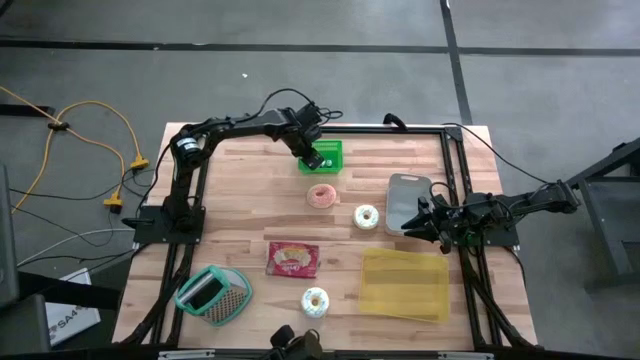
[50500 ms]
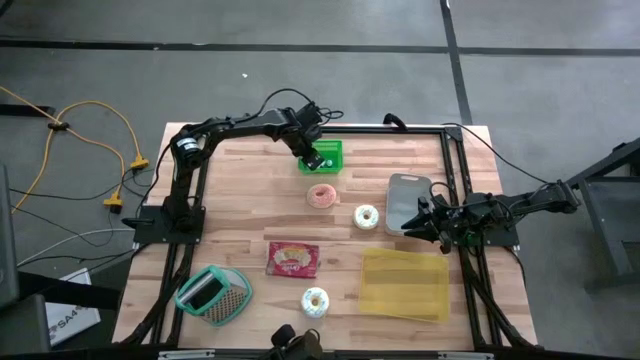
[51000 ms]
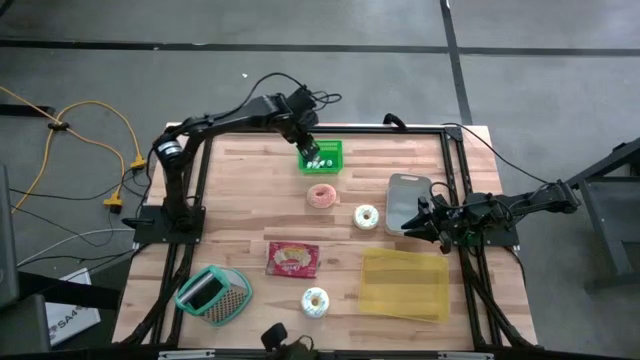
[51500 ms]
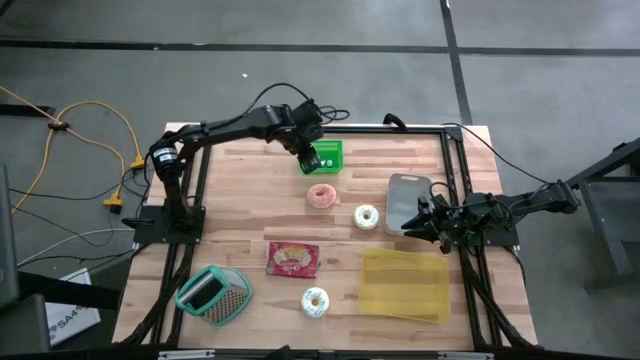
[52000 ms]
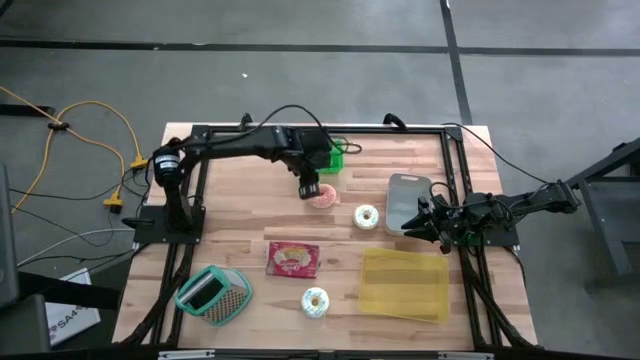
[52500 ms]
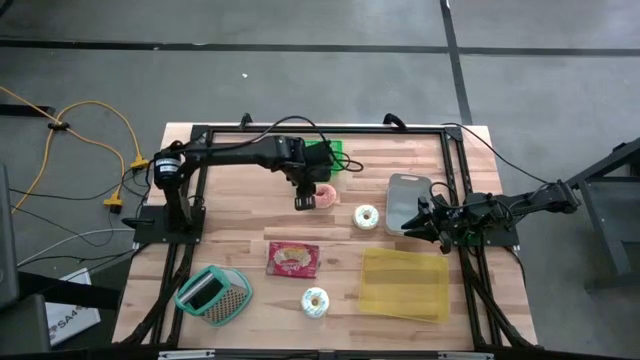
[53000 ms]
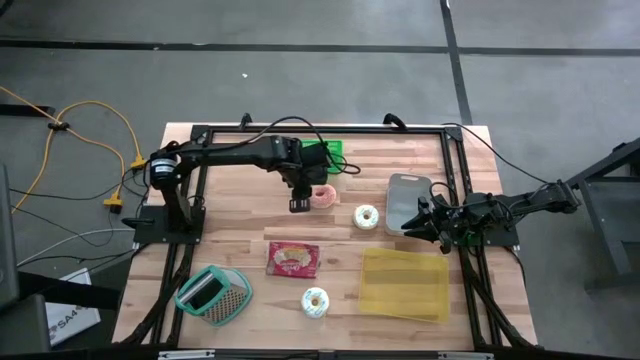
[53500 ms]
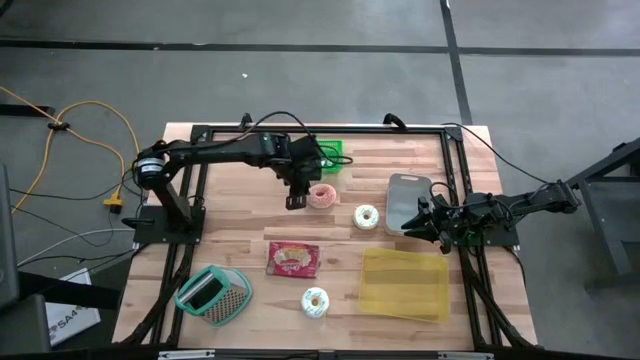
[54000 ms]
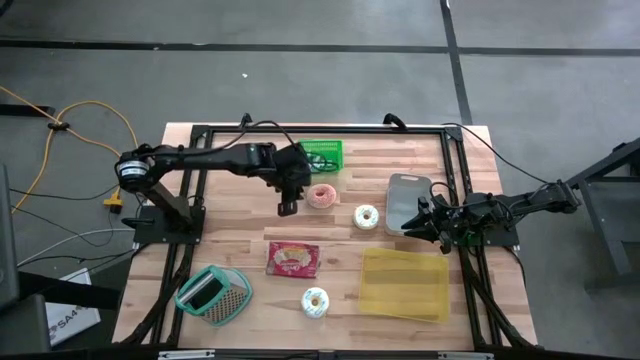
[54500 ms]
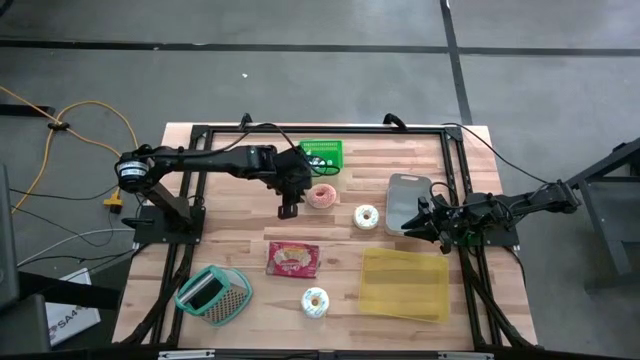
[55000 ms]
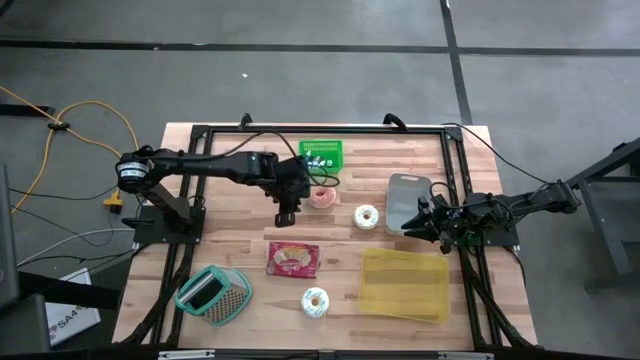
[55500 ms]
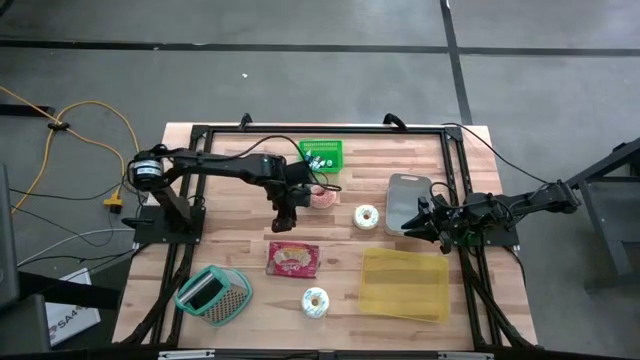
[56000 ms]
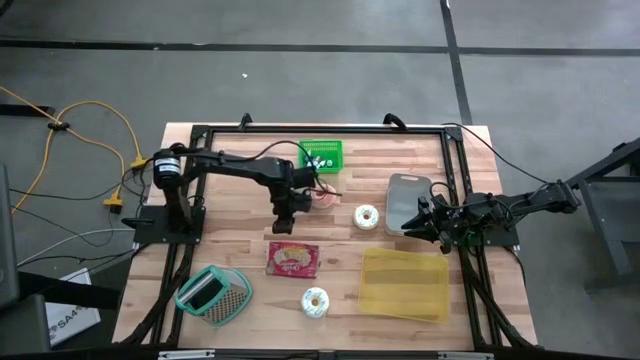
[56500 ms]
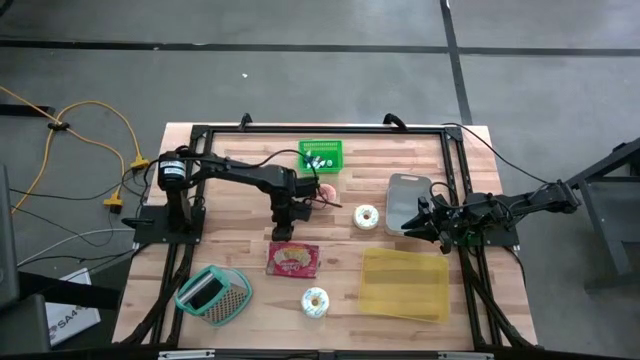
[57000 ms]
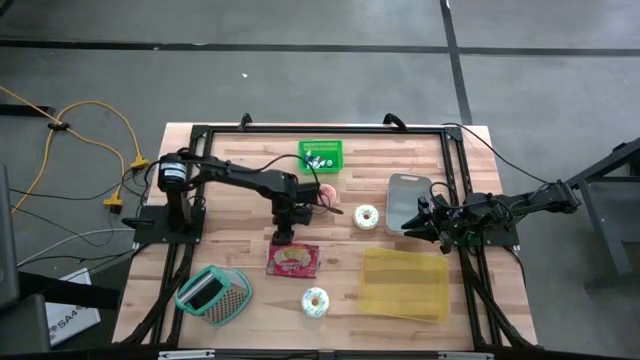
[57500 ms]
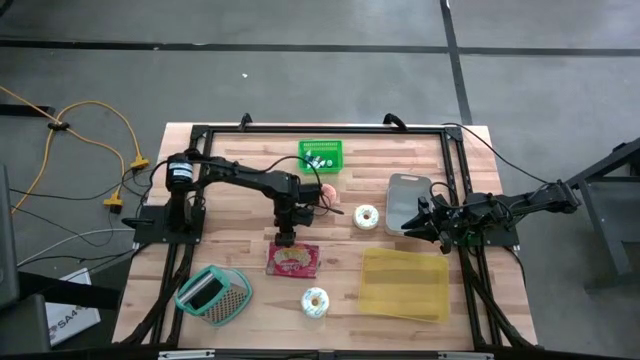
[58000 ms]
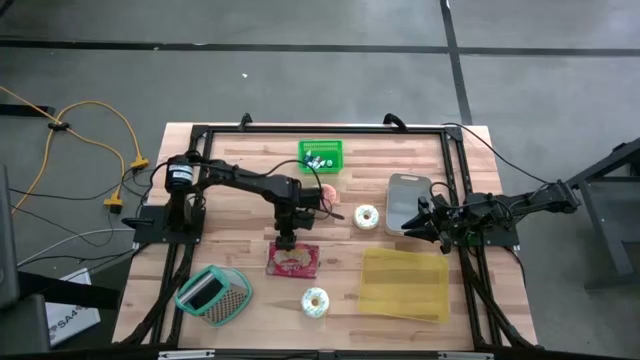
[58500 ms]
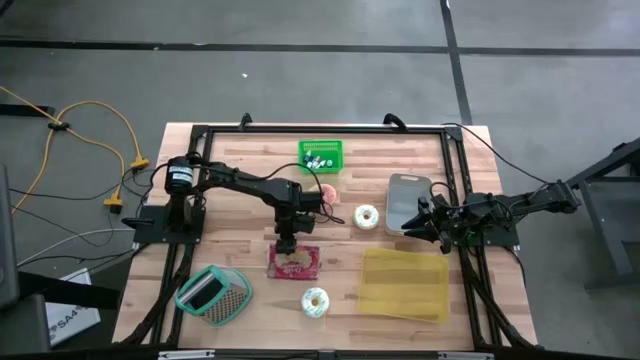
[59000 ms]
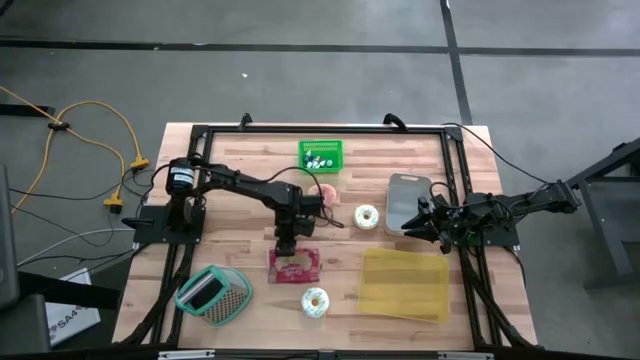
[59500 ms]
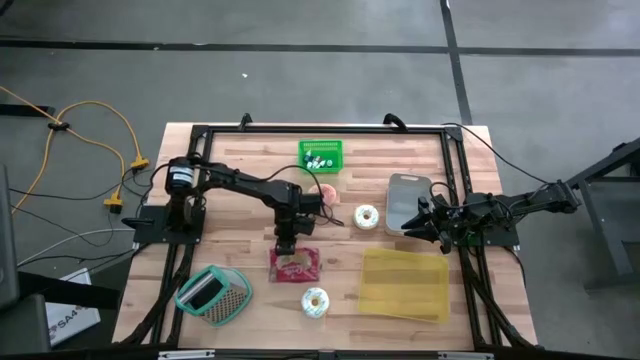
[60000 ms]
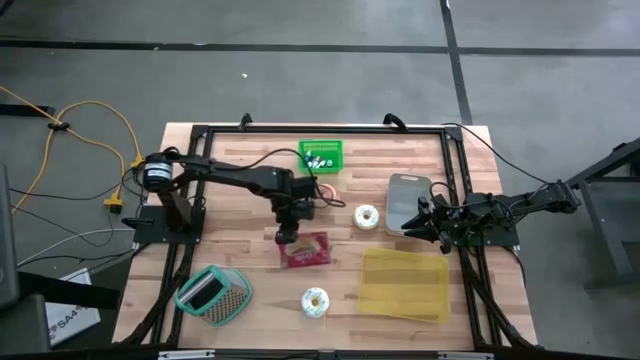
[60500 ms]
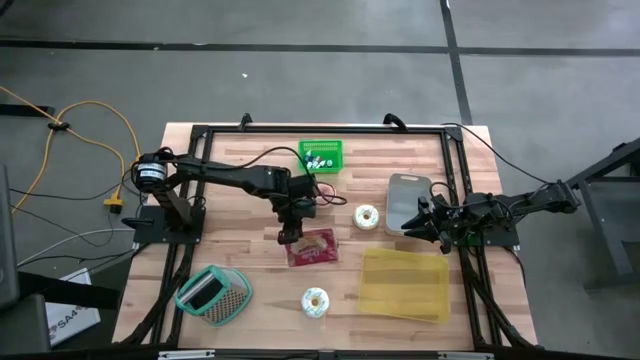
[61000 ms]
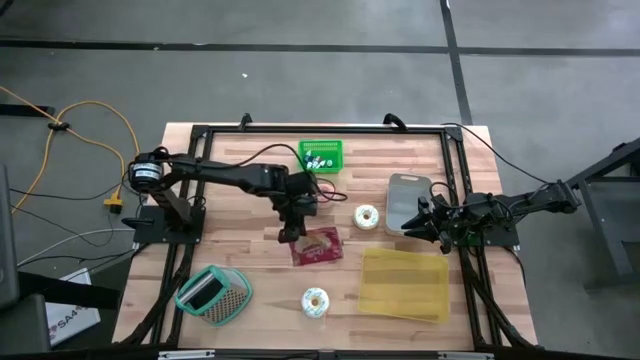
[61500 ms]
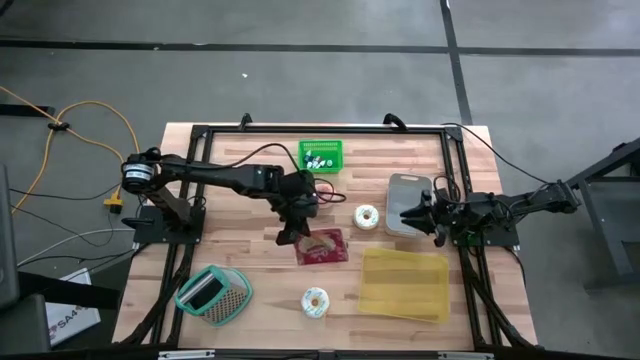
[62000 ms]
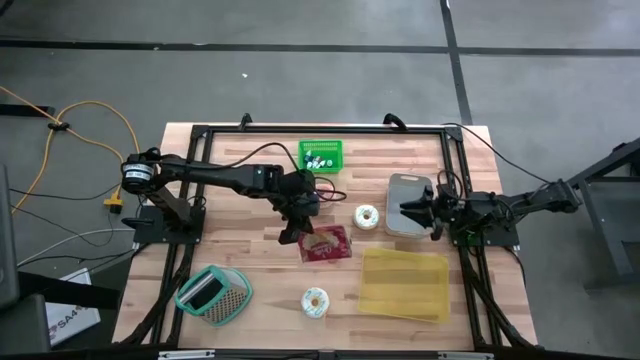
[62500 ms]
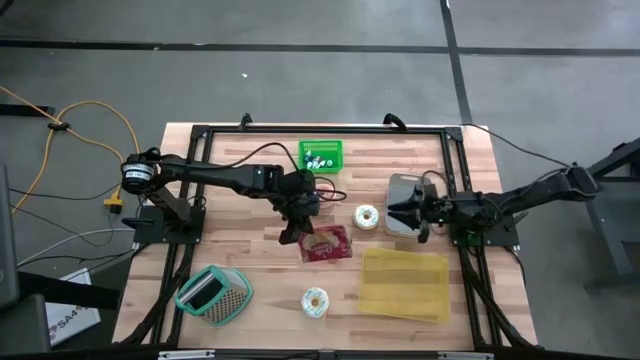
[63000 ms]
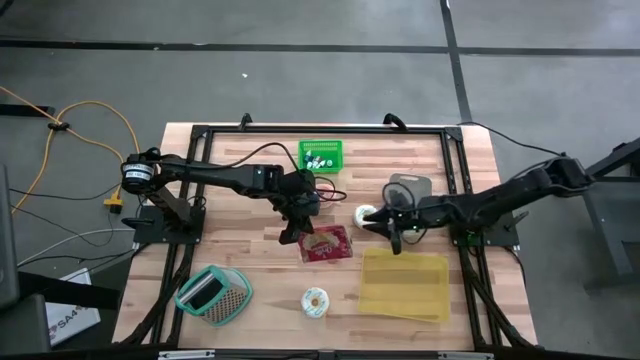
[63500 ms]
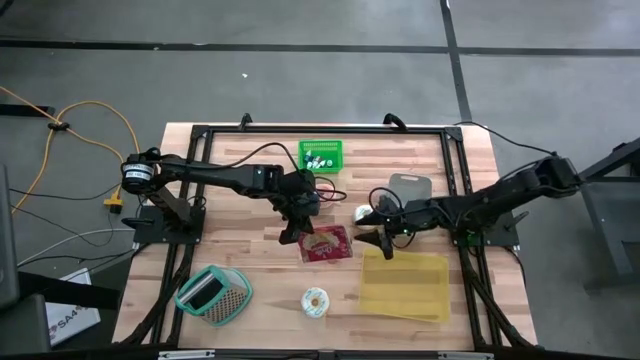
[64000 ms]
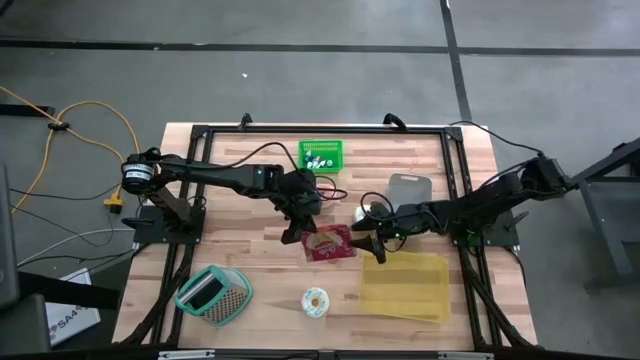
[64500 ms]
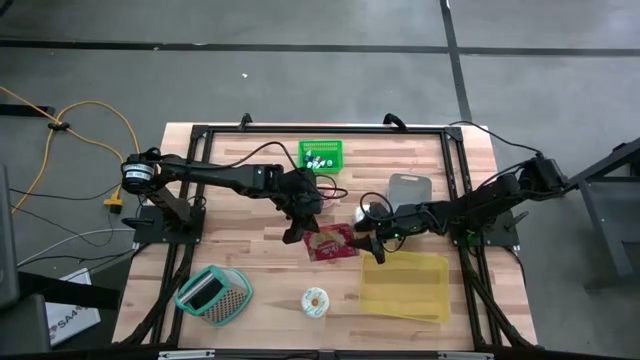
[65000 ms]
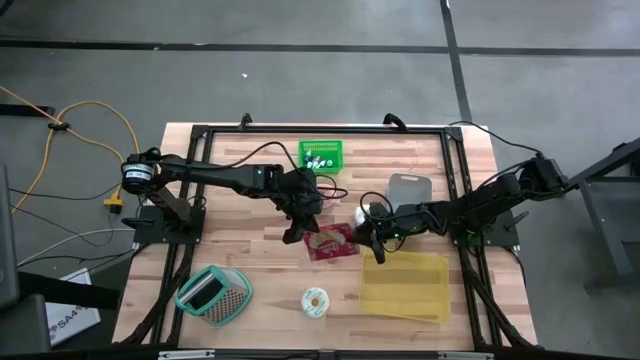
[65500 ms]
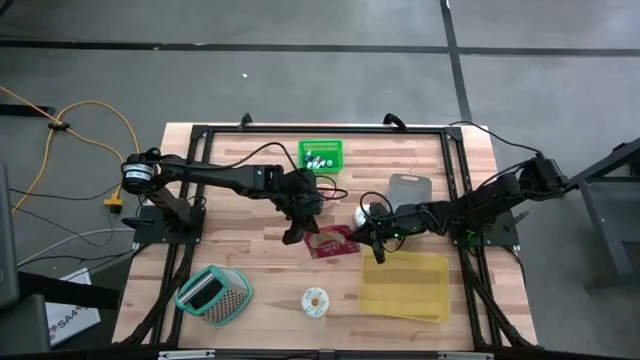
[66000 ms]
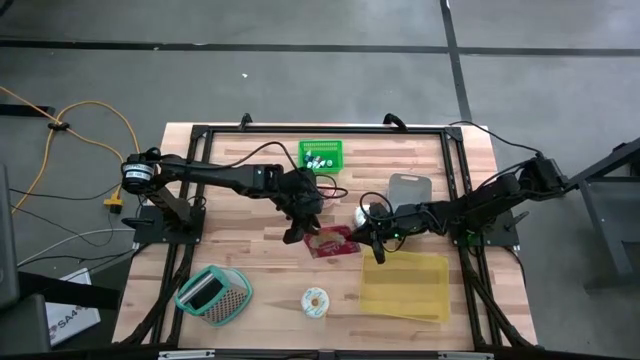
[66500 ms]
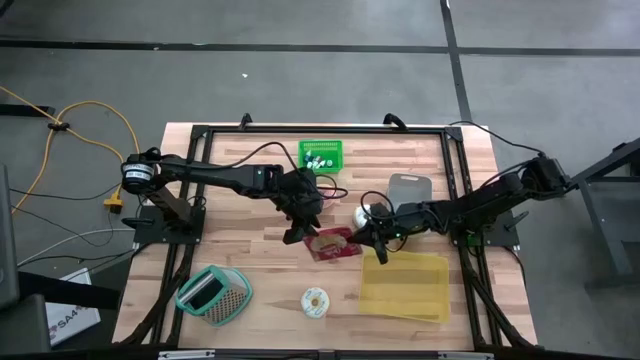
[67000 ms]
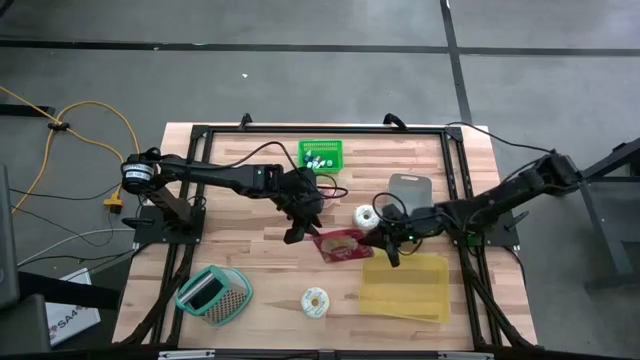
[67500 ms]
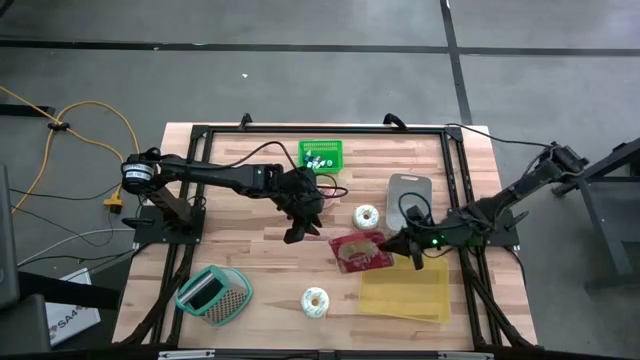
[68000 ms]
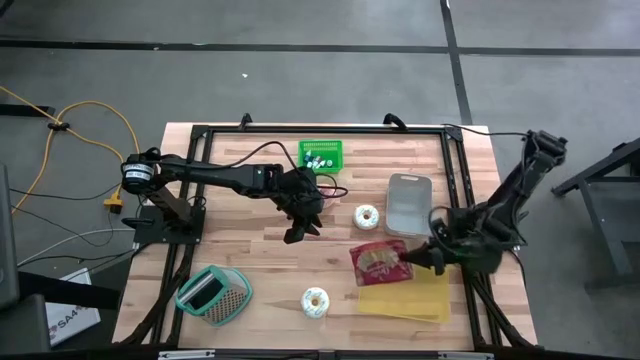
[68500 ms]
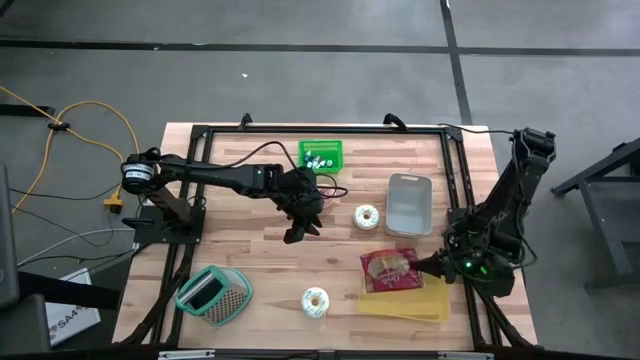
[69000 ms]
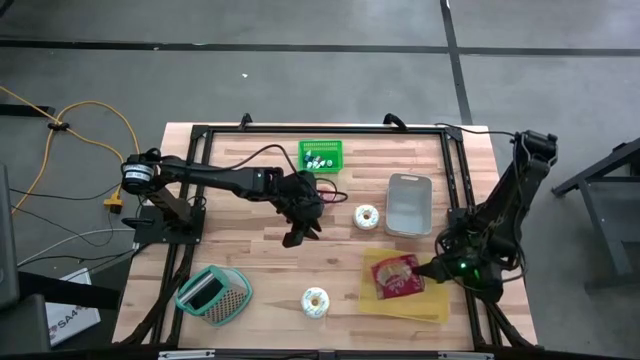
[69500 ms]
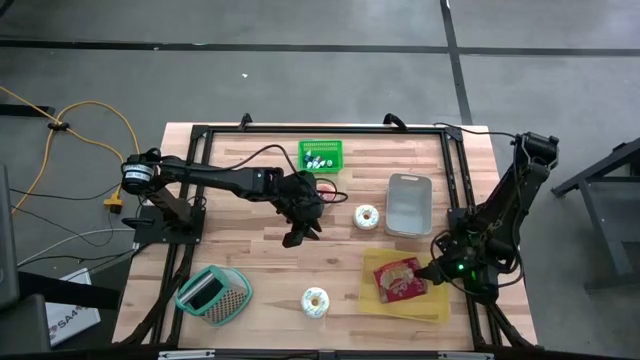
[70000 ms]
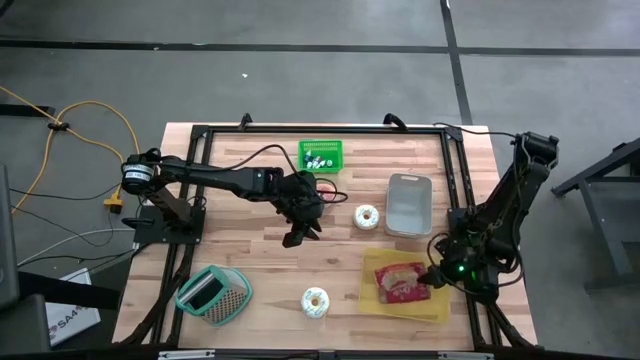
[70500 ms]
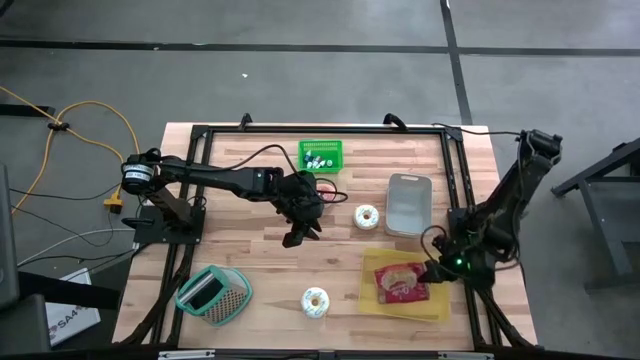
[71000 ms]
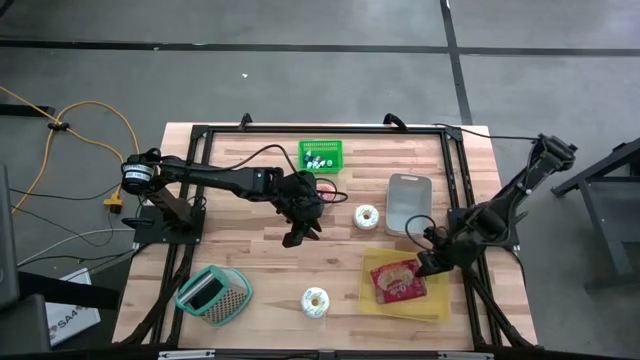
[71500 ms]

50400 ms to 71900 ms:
Put the red popcorn bag into the yellow bin
